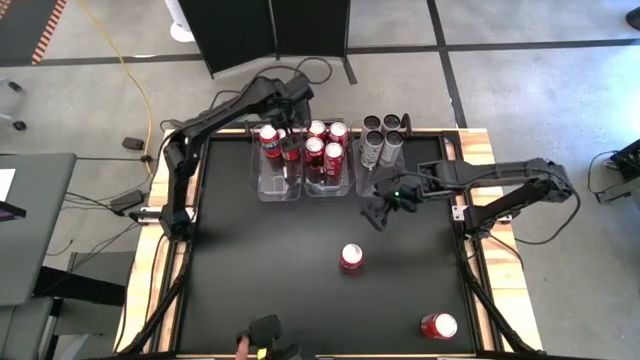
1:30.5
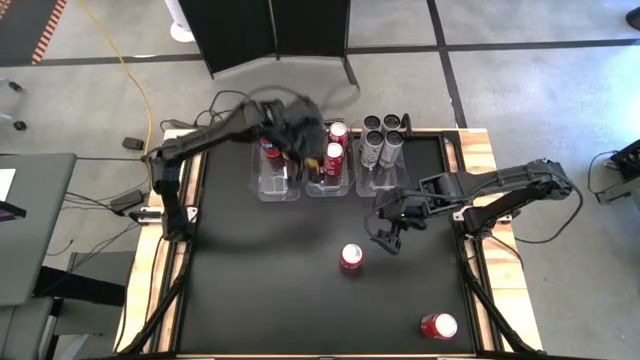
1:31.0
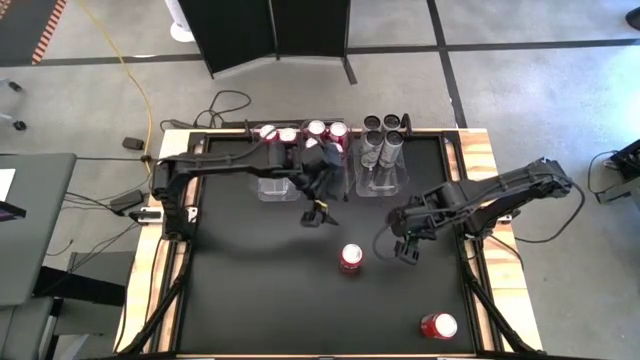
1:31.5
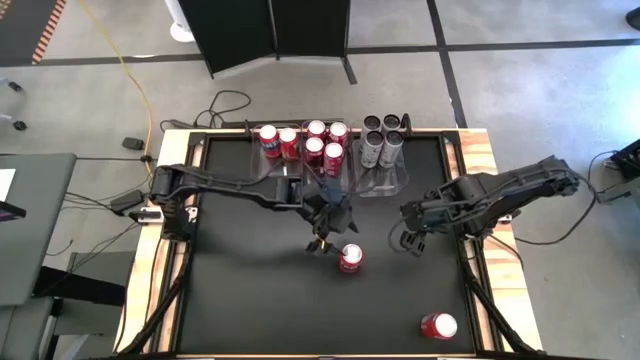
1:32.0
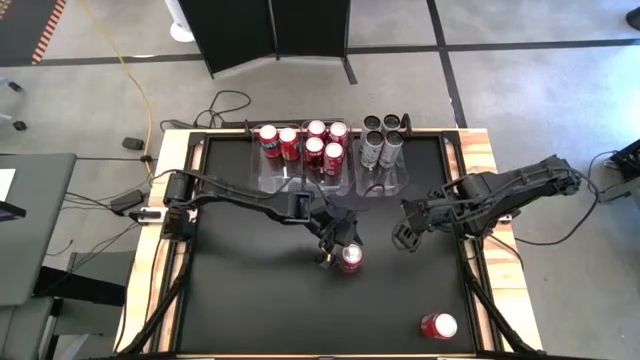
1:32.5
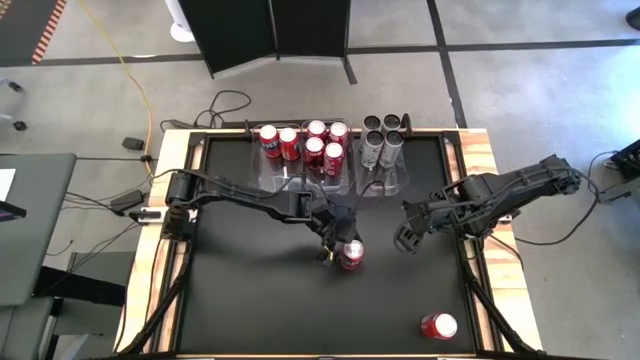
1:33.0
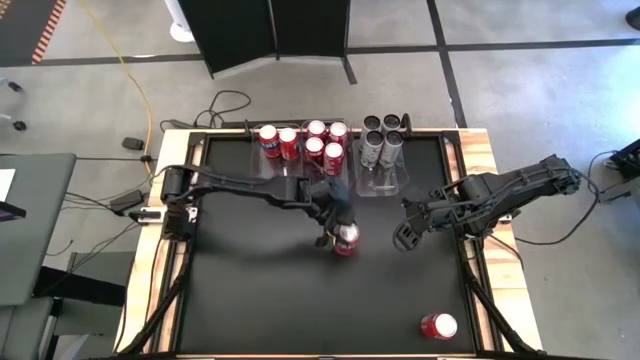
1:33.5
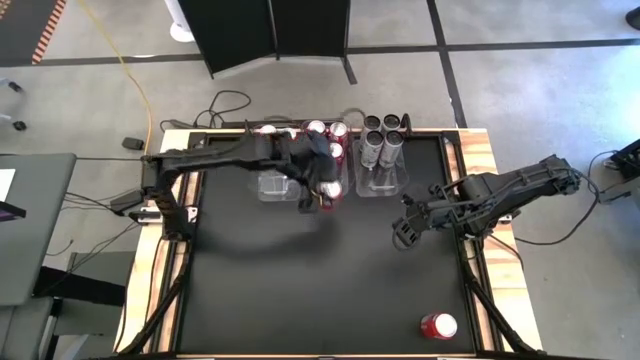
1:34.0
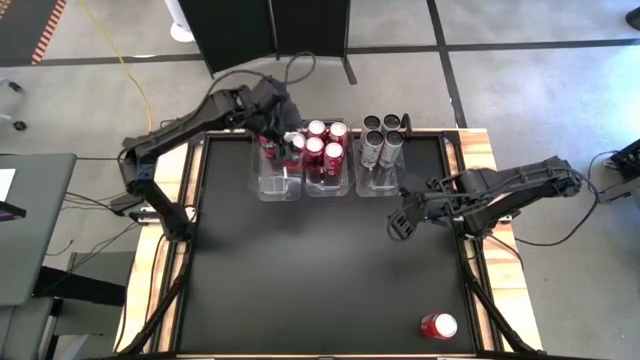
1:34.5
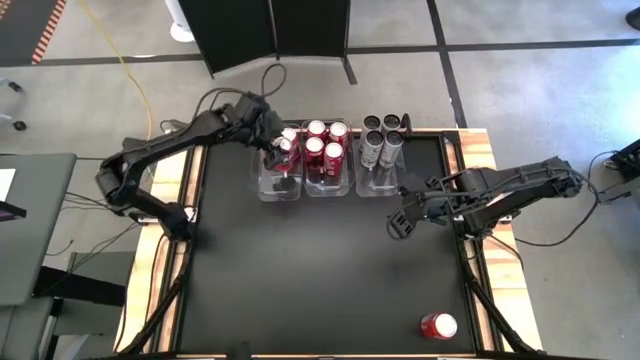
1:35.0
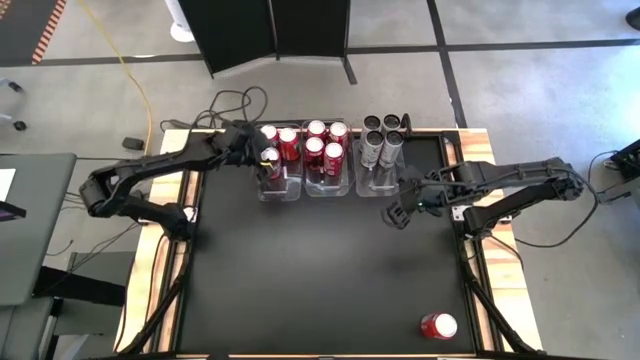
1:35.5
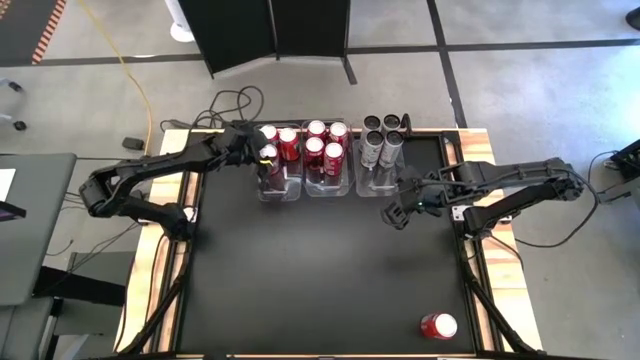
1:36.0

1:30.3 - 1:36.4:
Task: Sort soda cans
Put the top red soda can into the left transparent bin

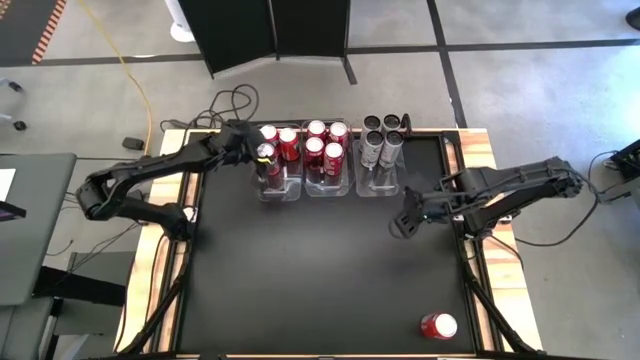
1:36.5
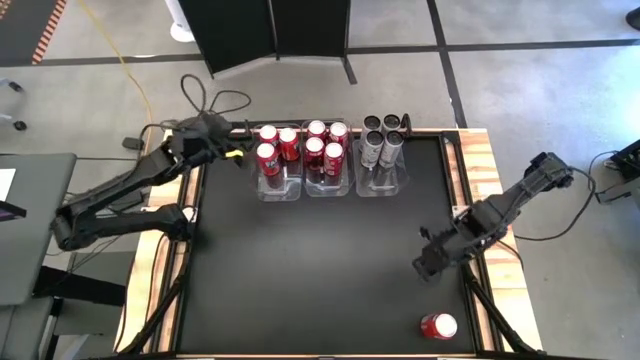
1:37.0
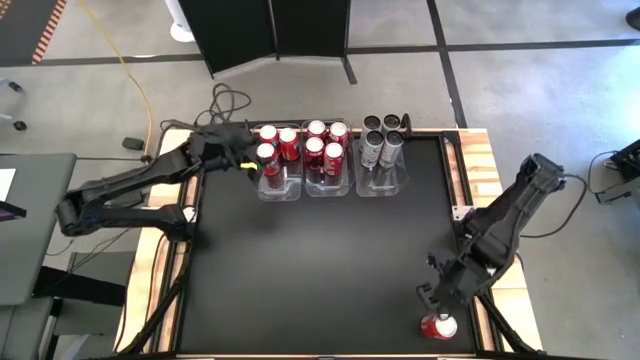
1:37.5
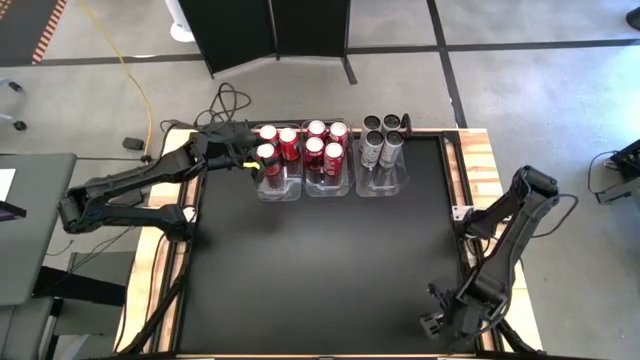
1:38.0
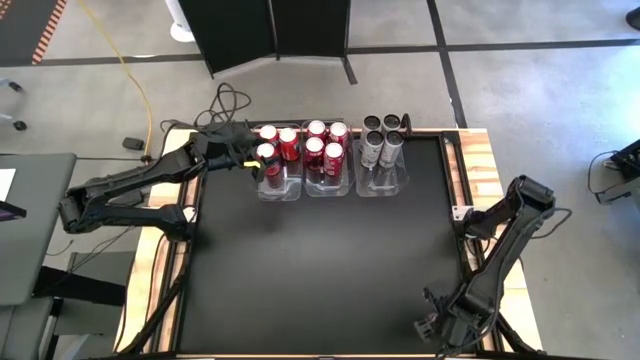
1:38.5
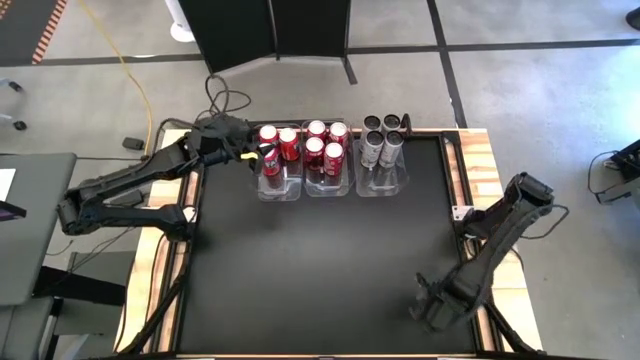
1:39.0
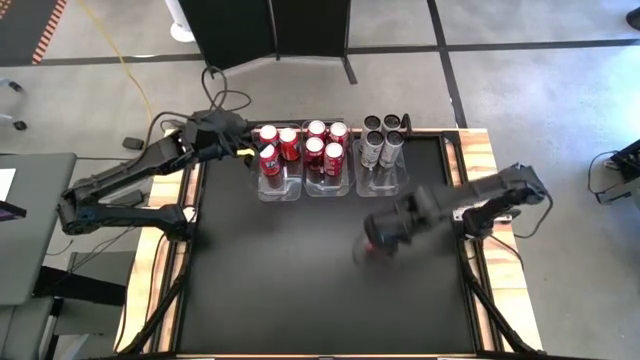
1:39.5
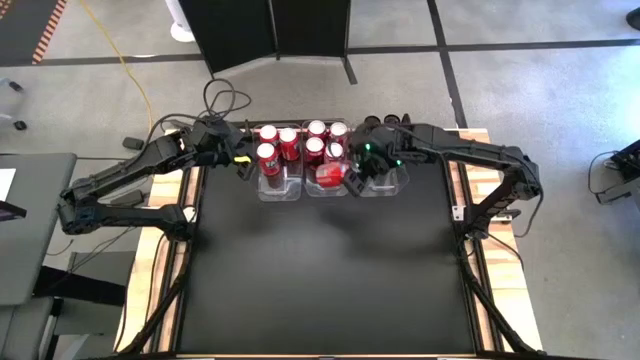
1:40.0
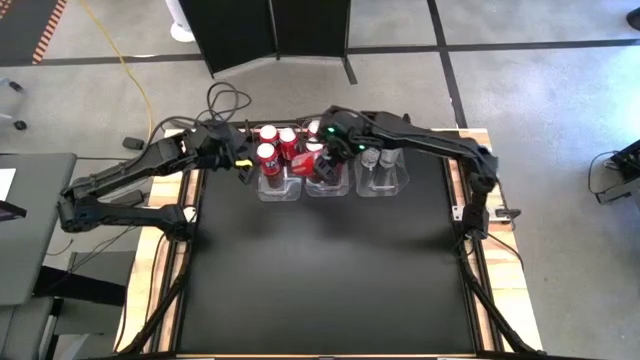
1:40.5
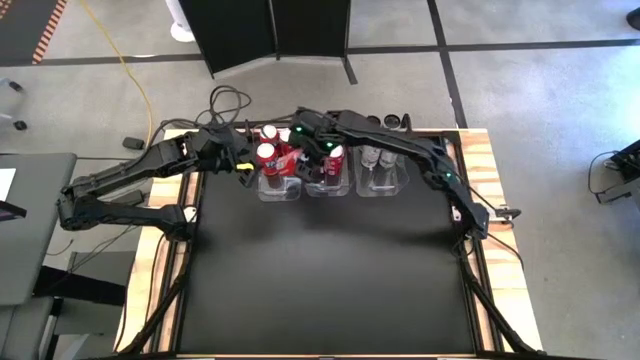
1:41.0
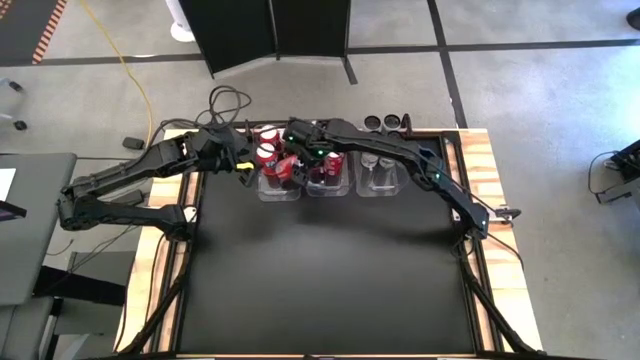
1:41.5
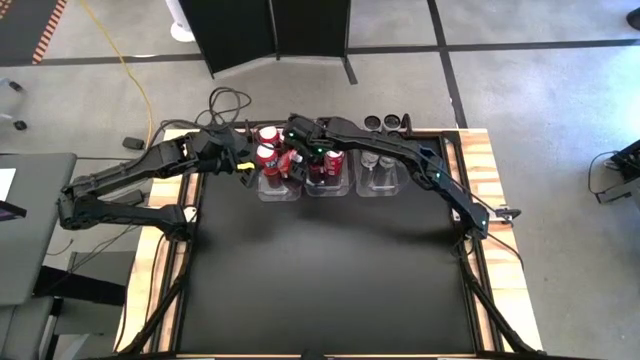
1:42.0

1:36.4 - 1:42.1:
Put the red soda can into the left transparent bin

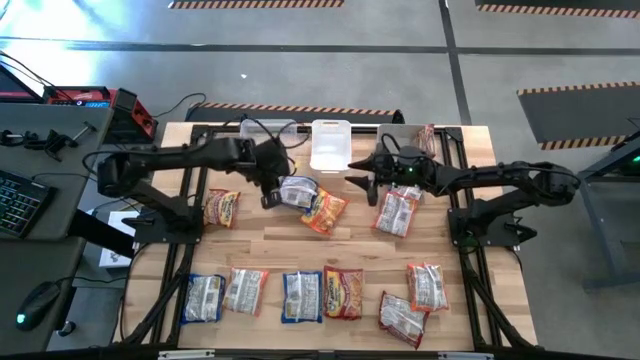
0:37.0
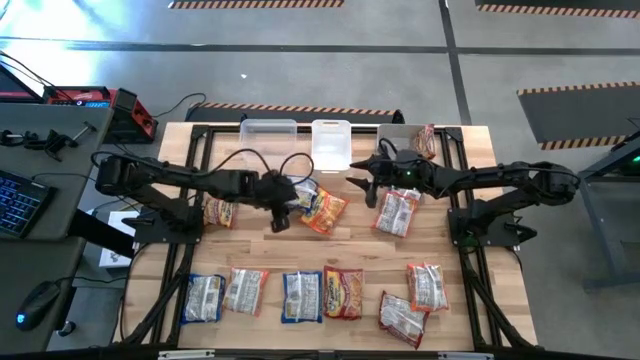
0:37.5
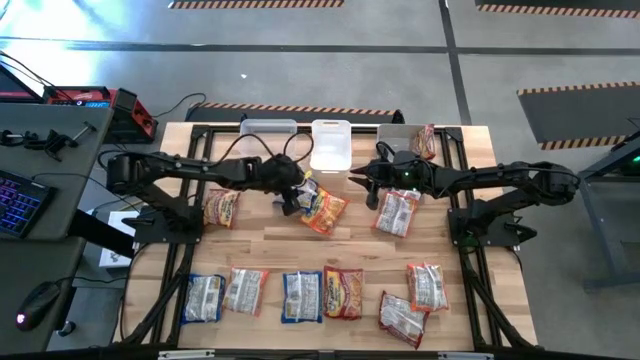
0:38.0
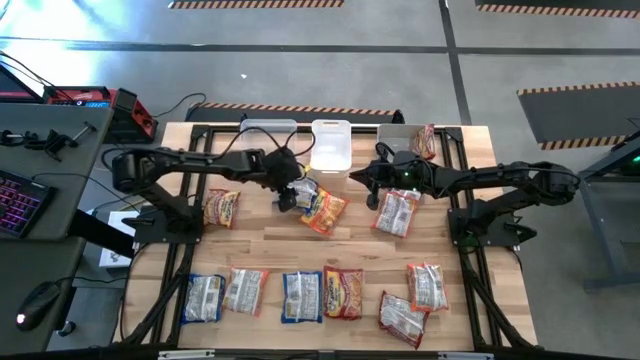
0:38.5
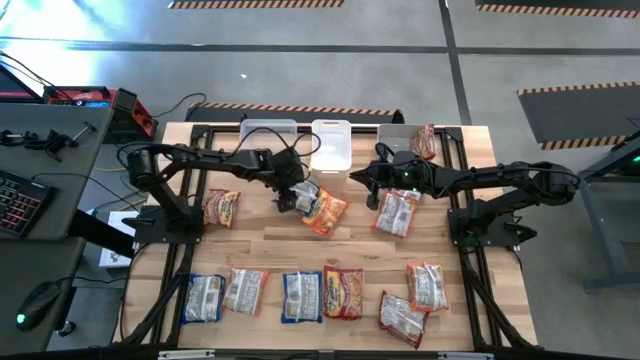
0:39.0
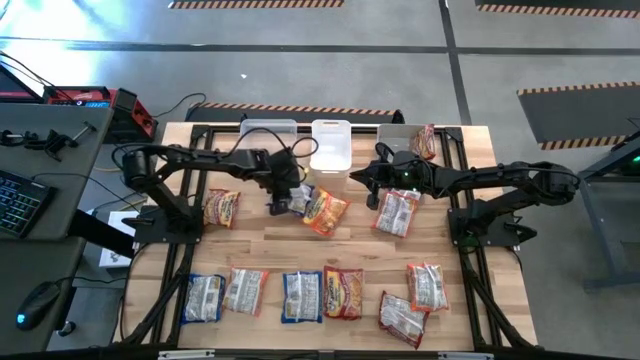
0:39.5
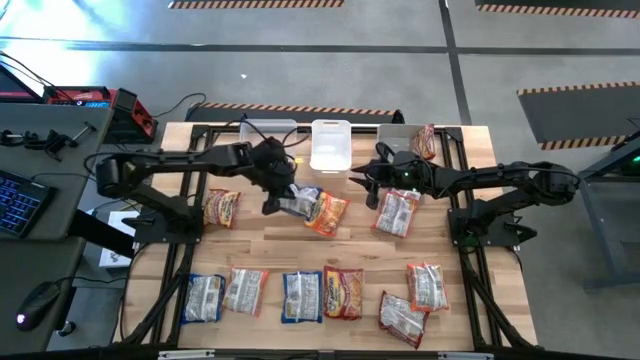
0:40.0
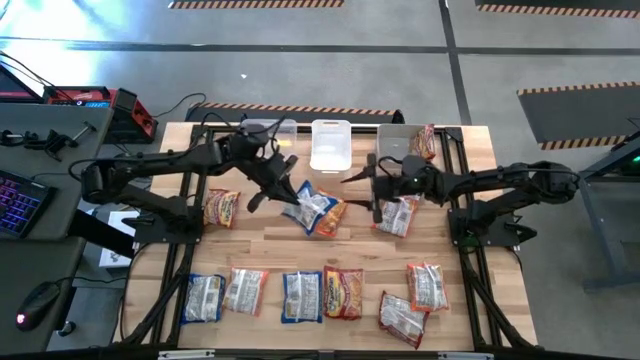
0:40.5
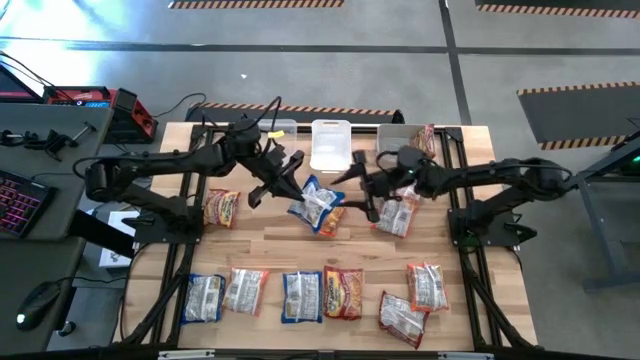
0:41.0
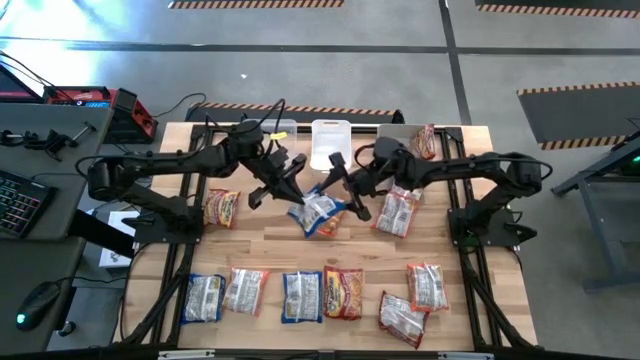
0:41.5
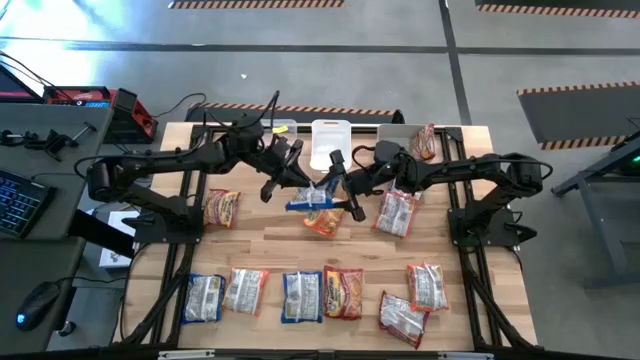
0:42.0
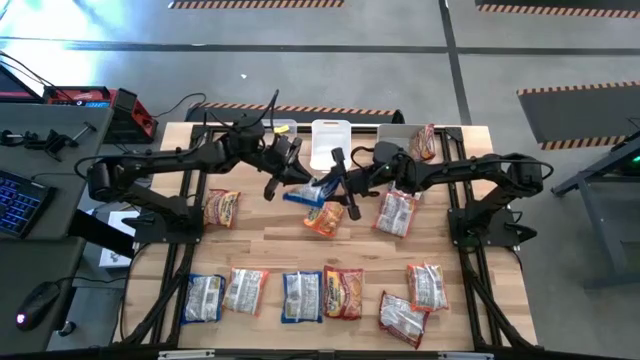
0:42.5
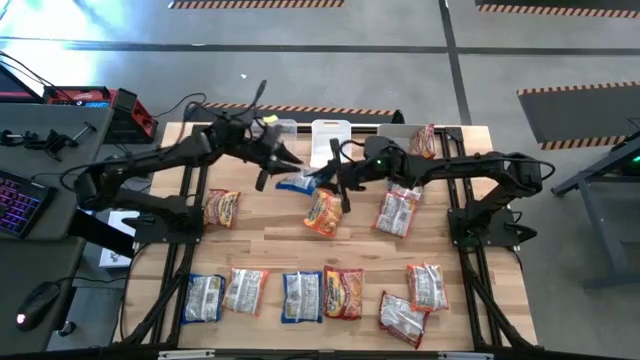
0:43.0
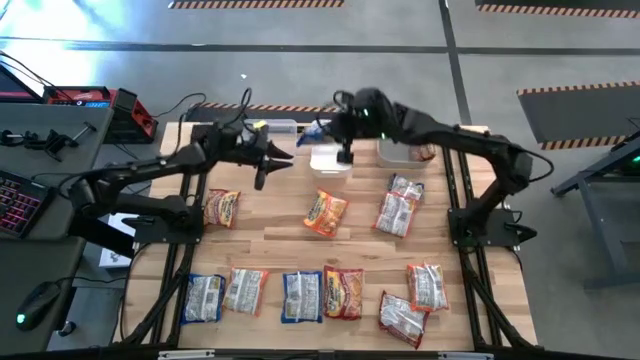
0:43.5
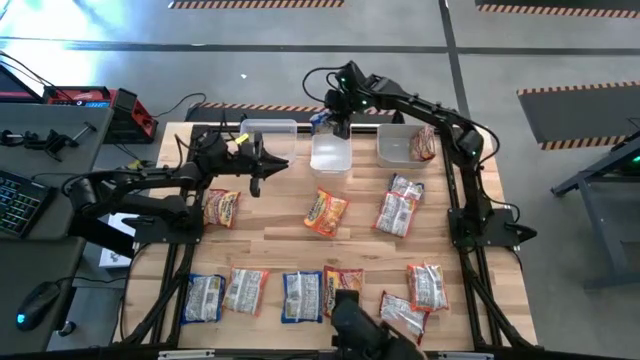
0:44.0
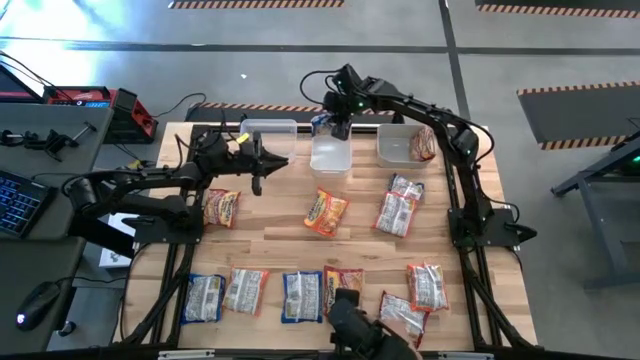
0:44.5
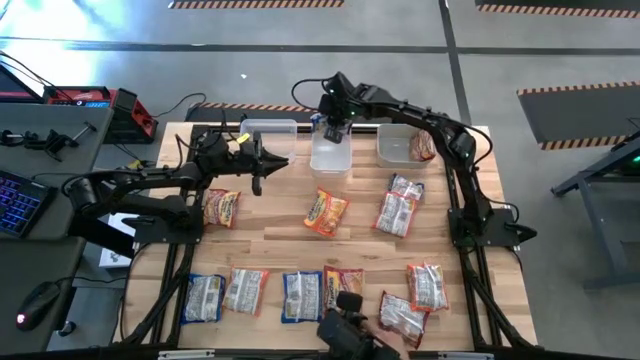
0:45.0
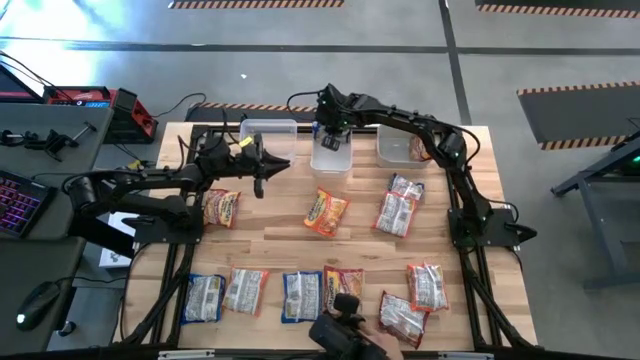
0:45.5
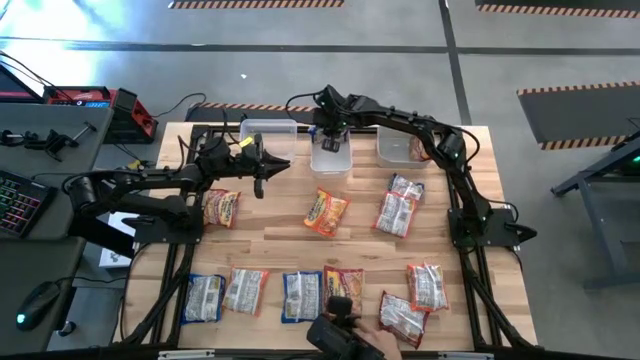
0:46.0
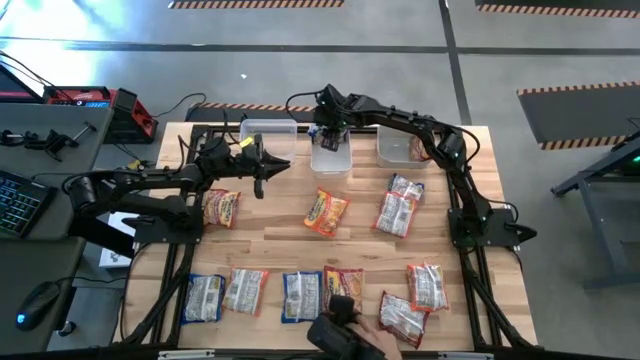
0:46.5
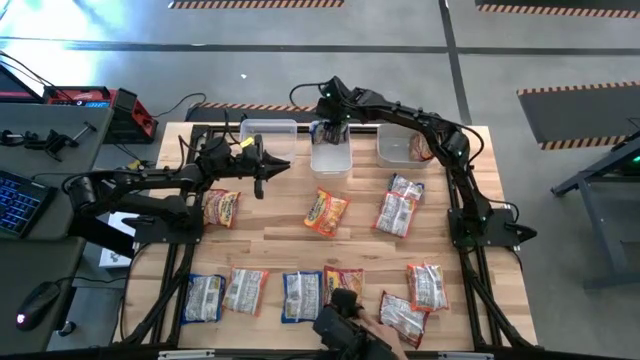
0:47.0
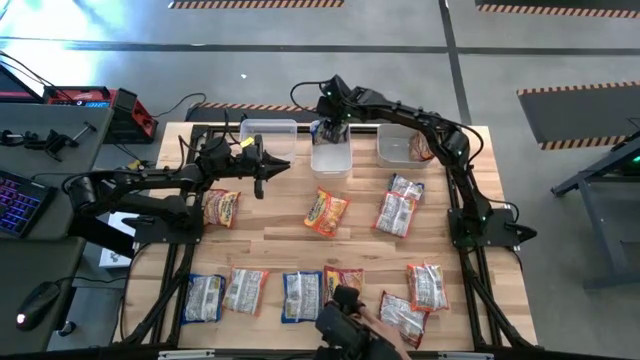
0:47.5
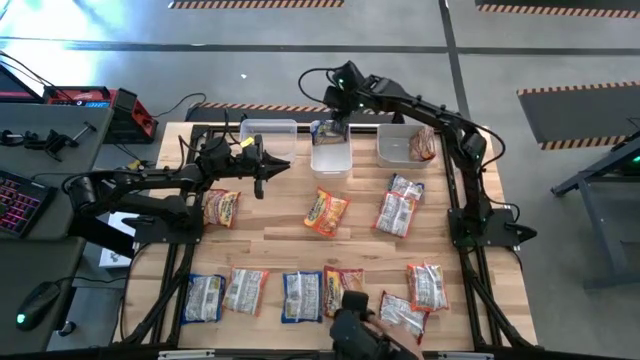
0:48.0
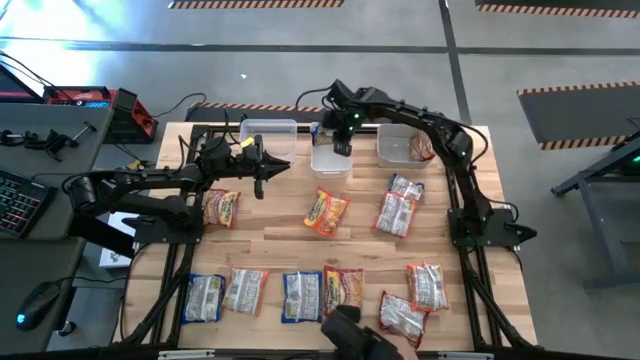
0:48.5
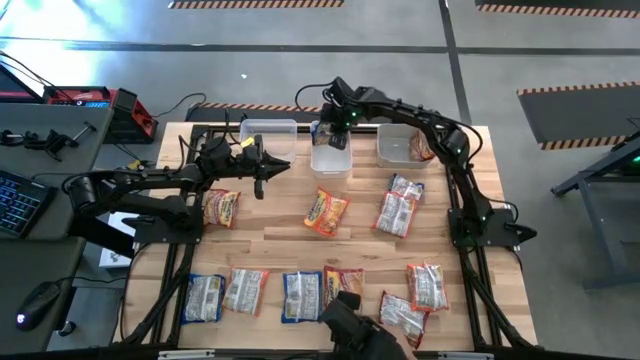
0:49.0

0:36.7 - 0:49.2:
Task: Sort Maruchan noodles
Put the blue noodle pack into the white bin
